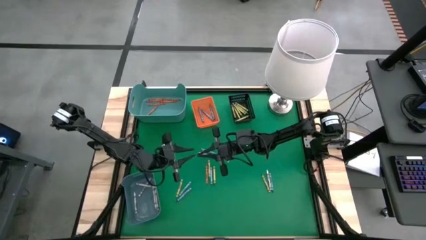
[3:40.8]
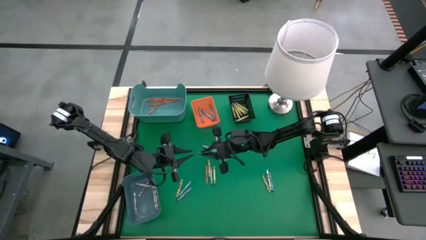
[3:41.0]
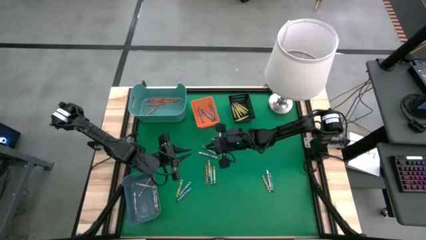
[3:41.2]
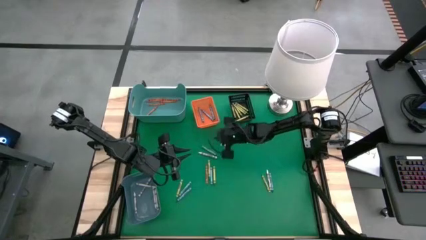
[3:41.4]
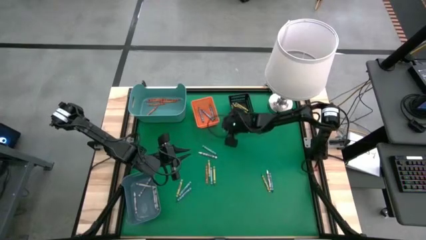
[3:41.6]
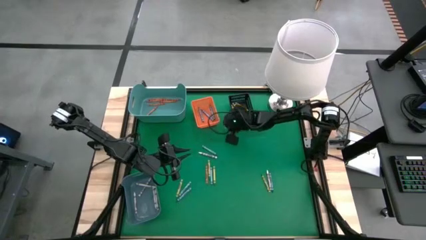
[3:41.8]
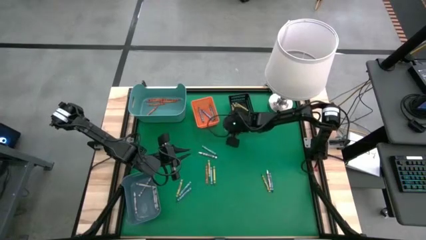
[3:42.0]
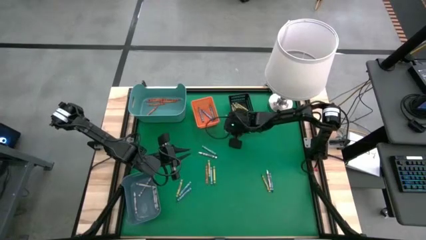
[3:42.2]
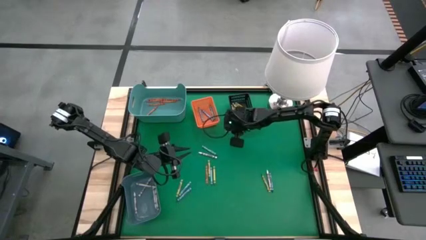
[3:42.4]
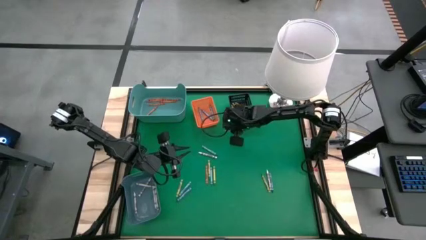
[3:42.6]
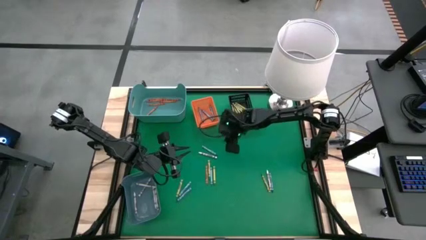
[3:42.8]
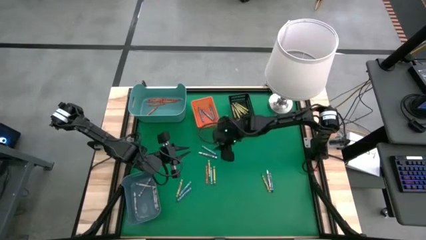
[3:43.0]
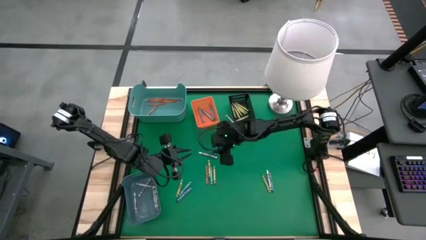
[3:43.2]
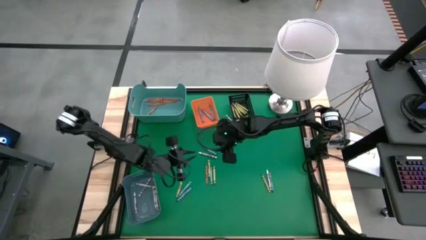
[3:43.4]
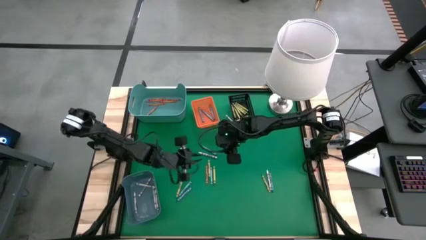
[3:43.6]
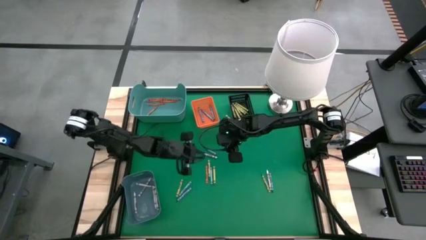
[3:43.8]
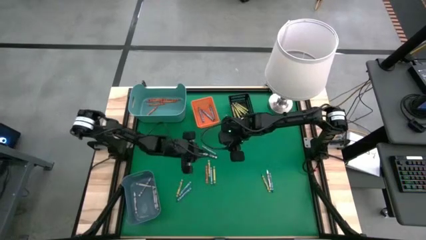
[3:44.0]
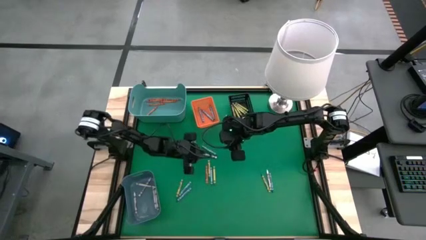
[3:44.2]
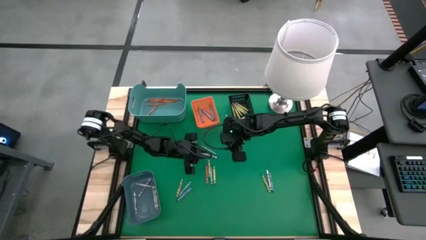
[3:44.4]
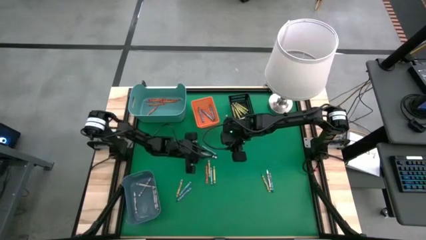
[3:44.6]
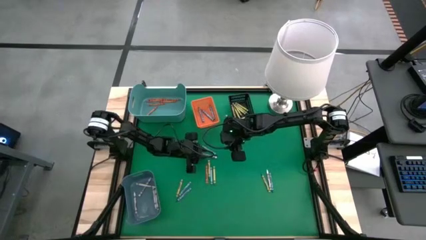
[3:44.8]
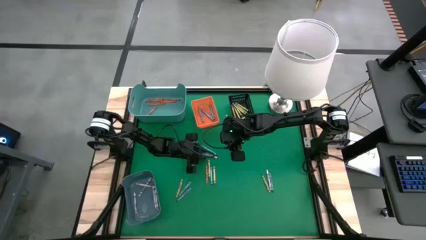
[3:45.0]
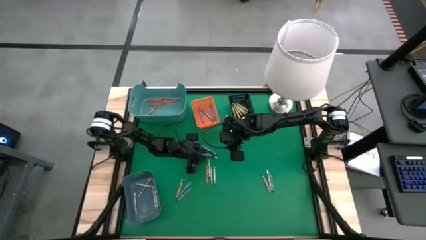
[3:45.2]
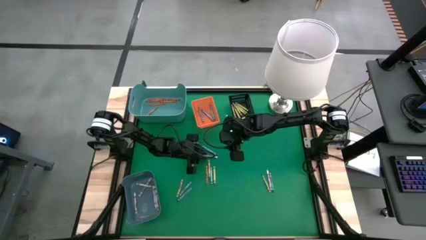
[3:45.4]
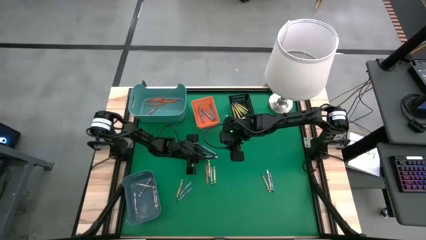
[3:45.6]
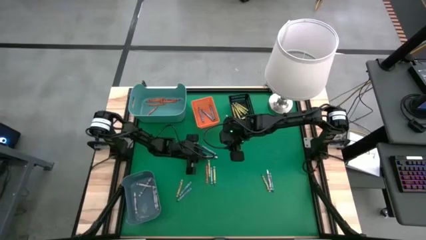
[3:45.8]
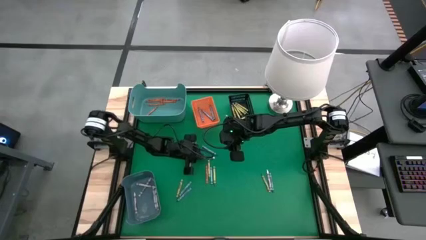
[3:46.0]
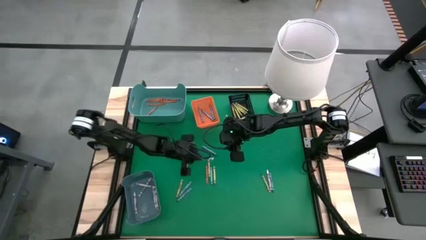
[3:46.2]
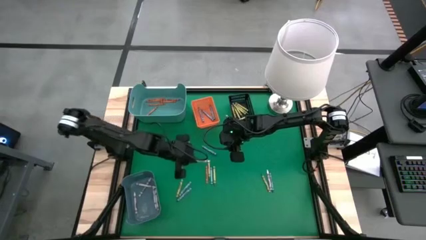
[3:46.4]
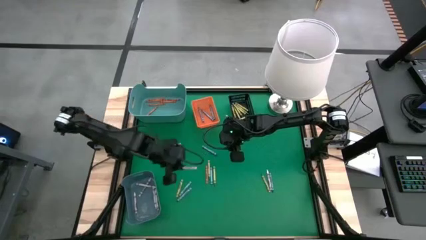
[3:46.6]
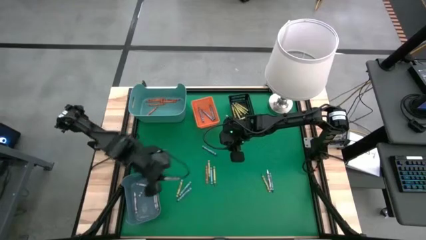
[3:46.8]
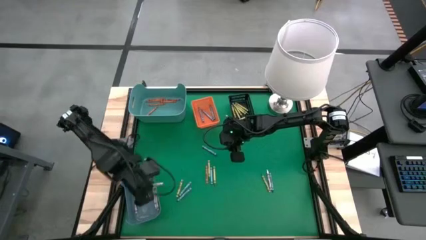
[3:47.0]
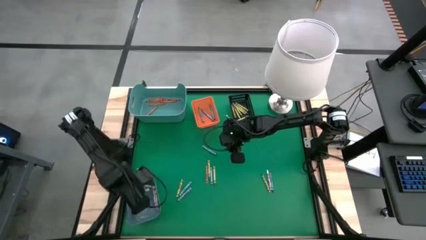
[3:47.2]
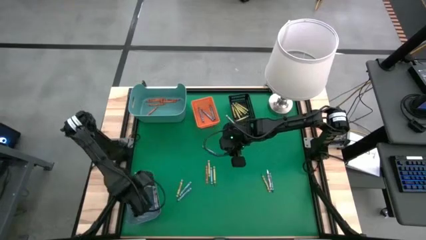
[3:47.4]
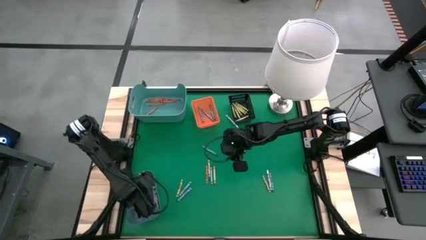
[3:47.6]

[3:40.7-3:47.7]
Task: Sort crayons
Put the white crayon into the blue bin

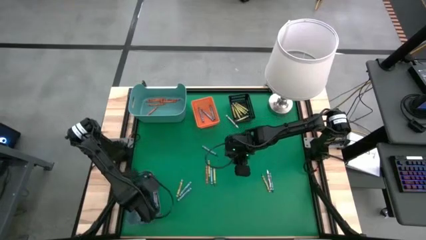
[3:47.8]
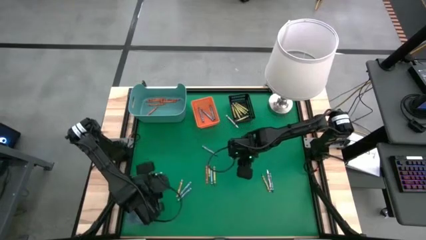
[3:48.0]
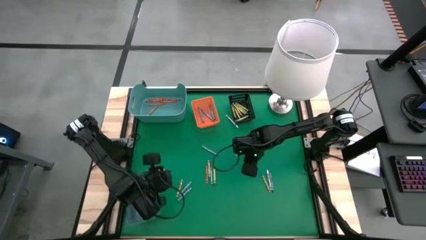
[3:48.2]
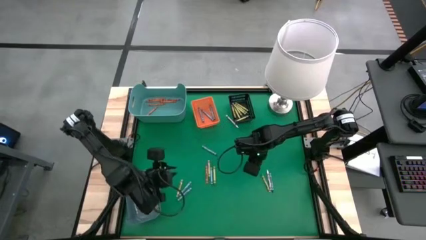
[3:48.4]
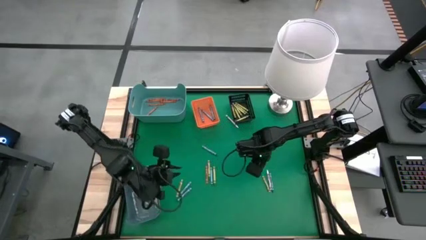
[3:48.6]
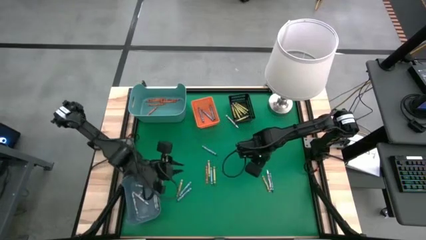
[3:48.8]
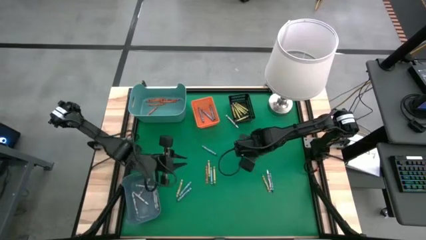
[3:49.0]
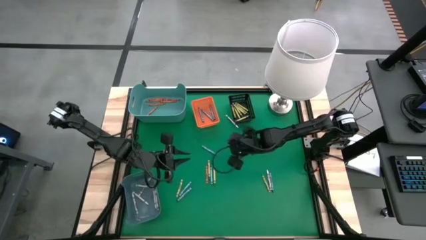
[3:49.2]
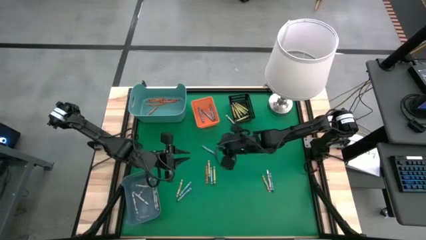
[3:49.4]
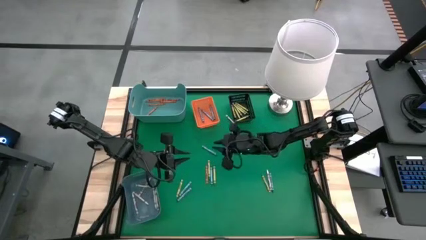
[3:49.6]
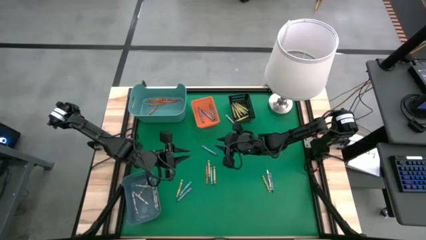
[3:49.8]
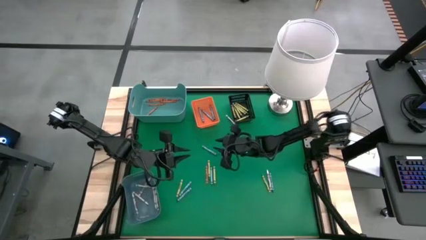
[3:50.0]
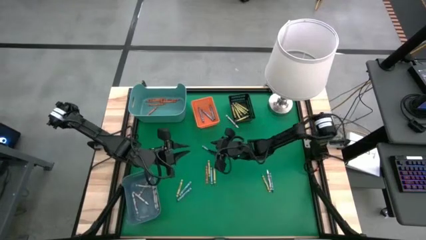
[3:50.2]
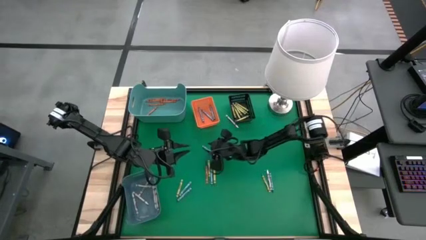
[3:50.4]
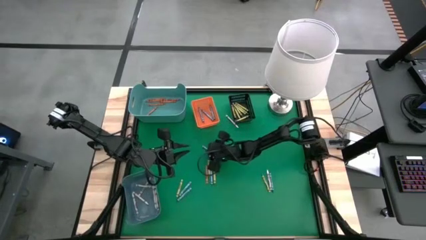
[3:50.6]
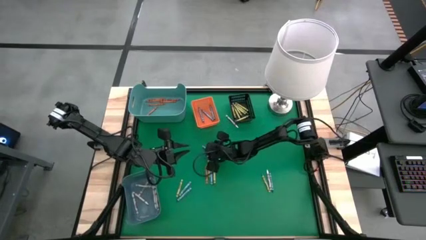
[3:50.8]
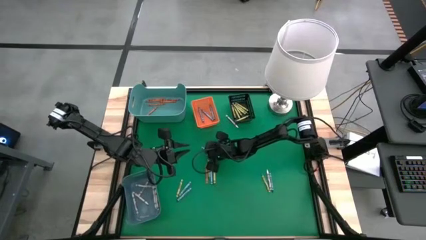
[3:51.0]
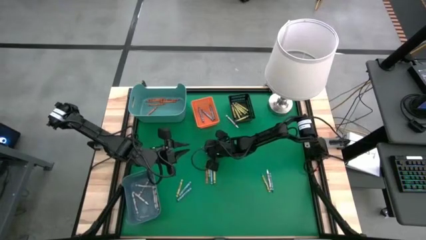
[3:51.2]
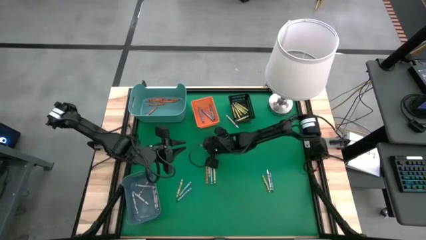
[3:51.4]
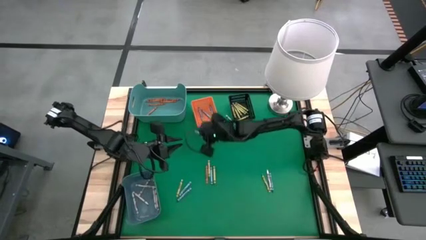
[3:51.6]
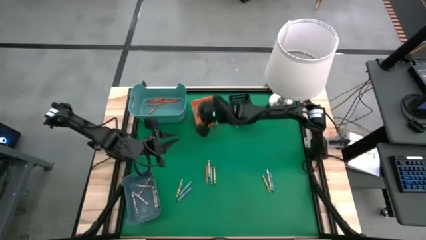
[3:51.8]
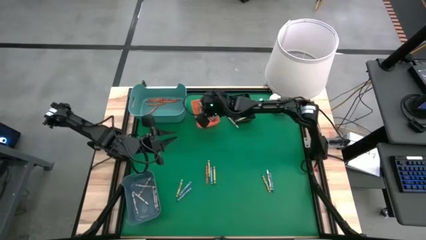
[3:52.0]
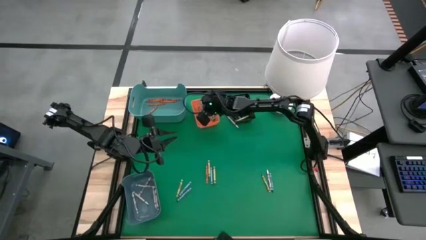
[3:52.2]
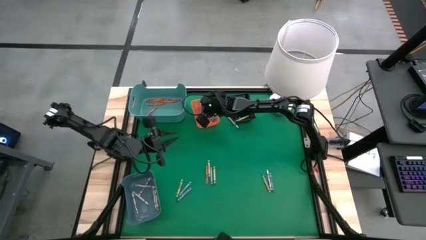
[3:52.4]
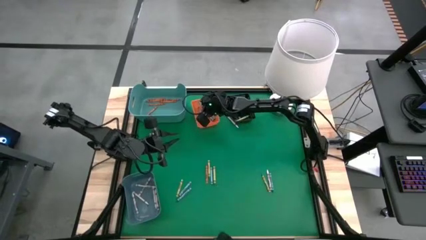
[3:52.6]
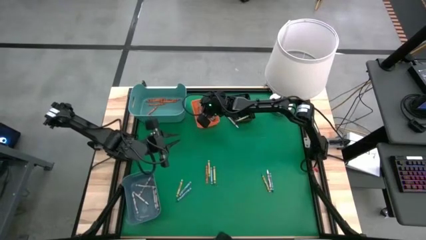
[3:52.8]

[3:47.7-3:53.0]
Put the blue crayon into the orange bin

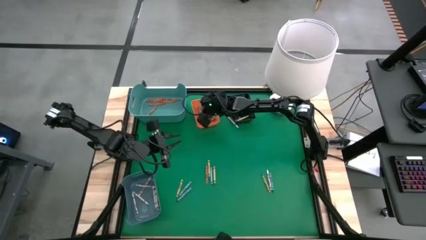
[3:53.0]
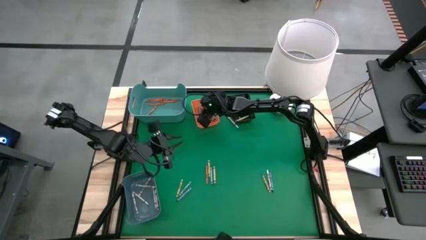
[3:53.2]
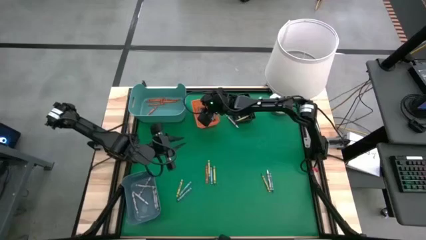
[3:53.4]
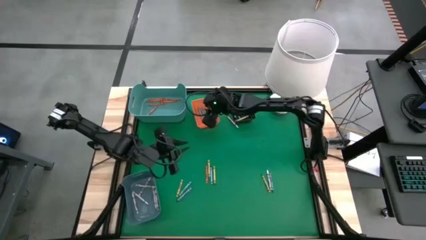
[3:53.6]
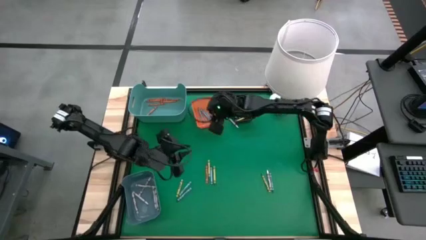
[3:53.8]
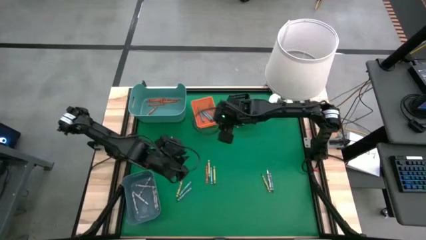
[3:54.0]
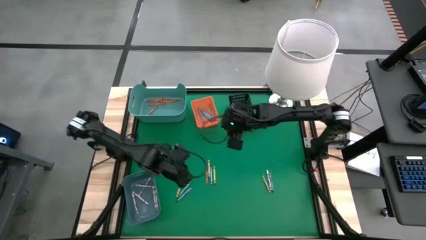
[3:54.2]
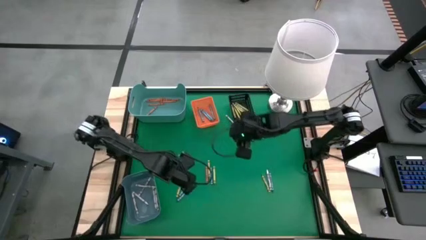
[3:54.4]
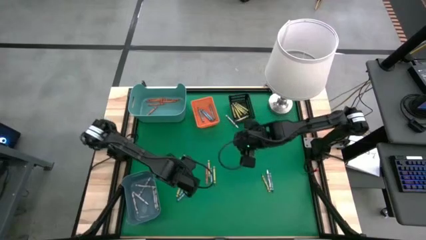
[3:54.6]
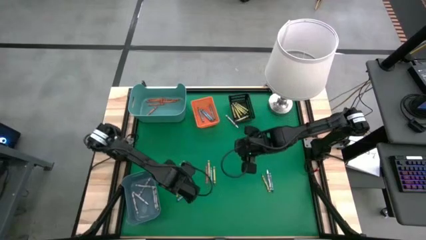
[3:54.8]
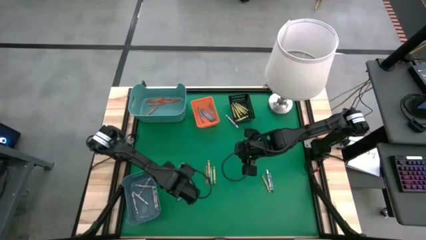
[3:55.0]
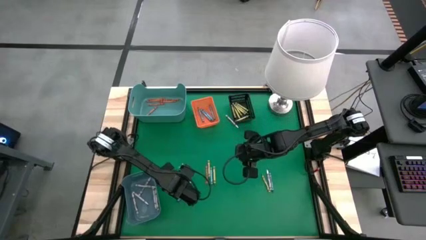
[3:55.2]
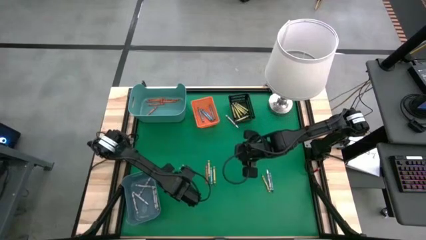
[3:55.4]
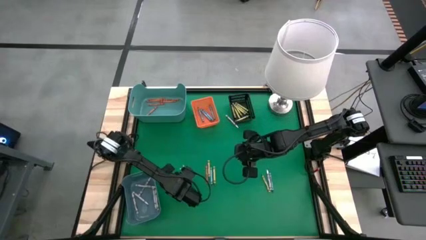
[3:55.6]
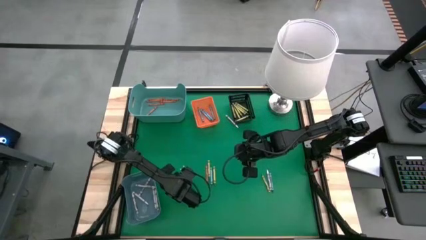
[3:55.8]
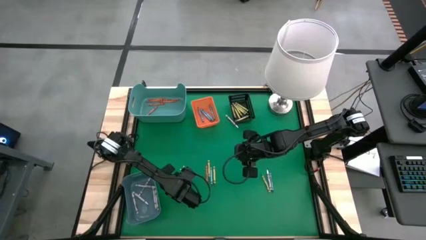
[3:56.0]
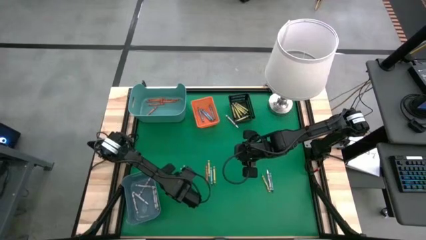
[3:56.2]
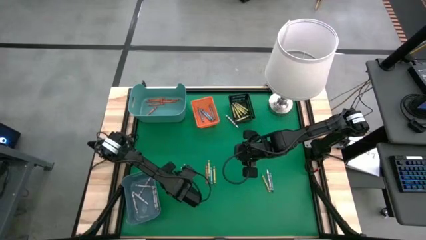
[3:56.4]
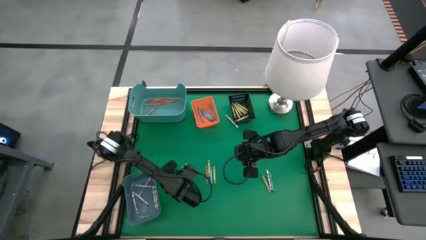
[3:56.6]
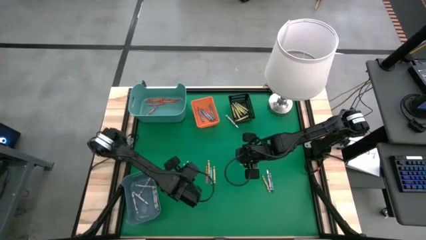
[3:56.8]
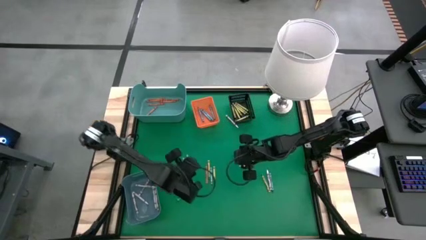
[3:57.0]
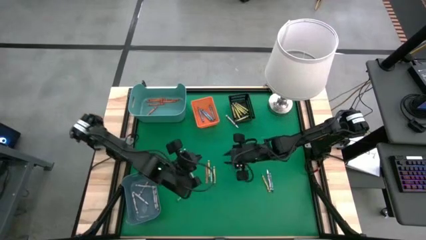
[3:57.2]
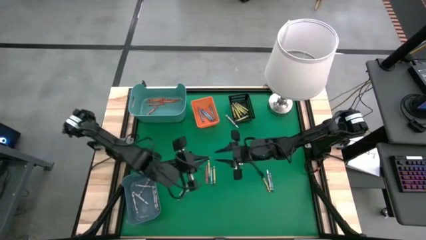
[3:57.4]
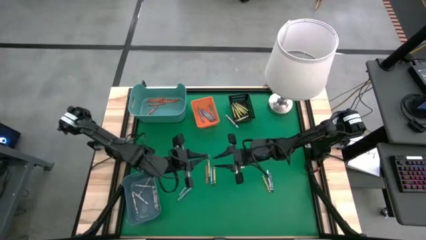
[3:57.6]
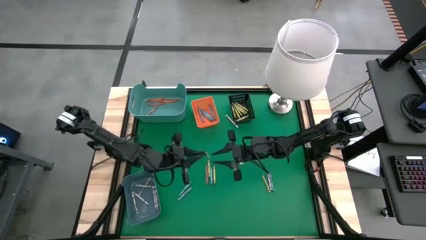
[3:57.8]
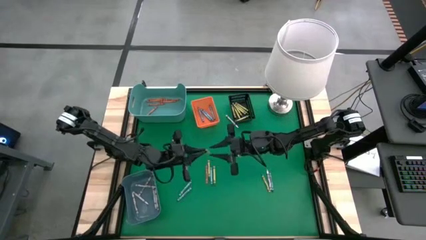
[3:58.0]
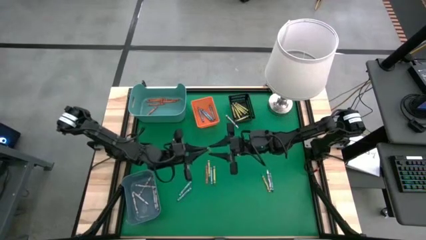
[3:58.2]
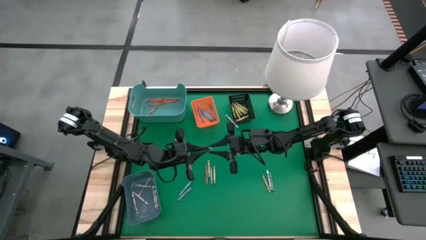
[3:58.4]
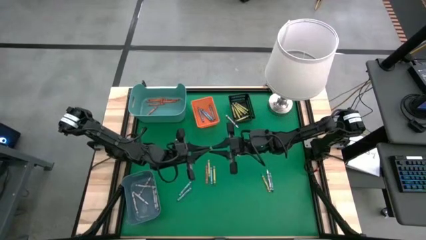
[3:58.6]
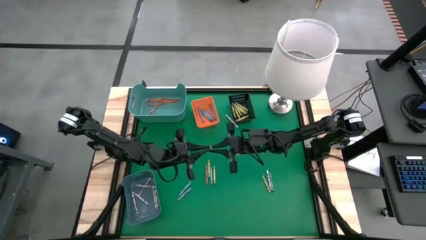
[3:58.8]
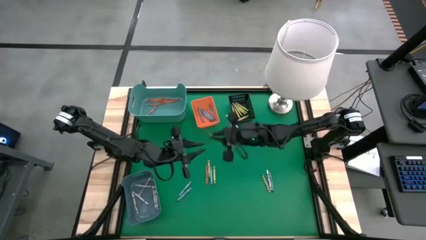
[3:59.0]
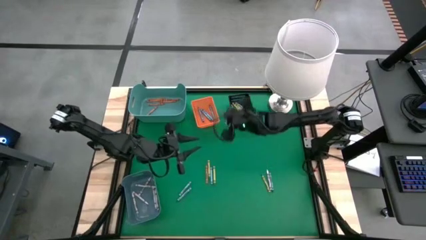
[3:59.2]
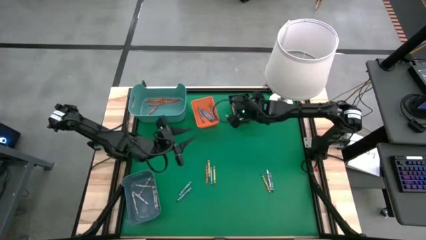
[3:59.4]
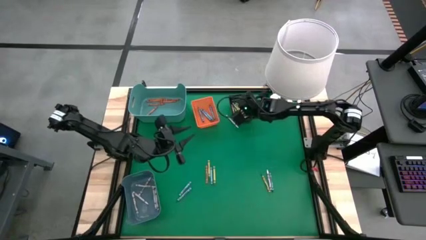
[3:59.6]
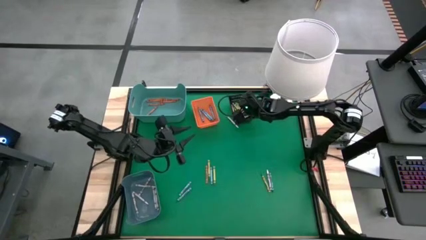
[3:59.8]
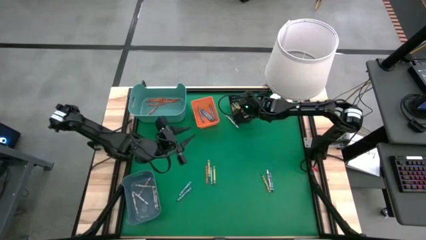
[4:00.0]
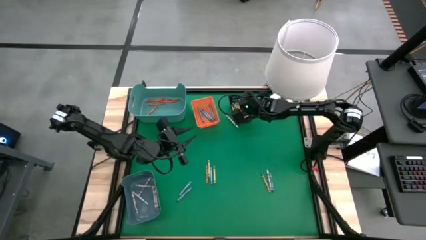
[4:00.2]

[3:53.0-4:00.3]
Put the green crayon into the black bin
